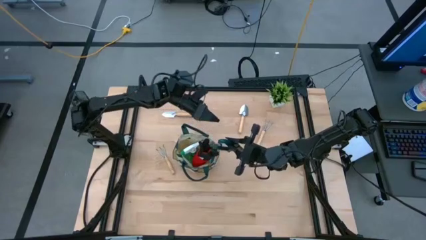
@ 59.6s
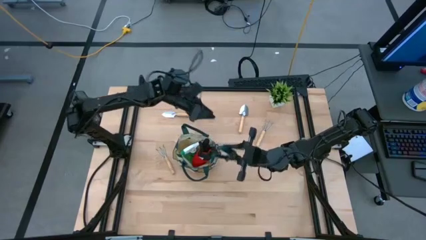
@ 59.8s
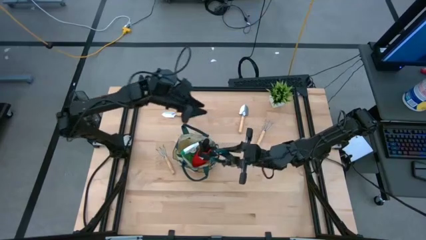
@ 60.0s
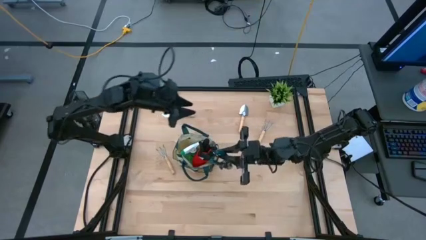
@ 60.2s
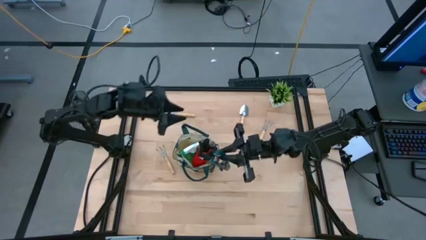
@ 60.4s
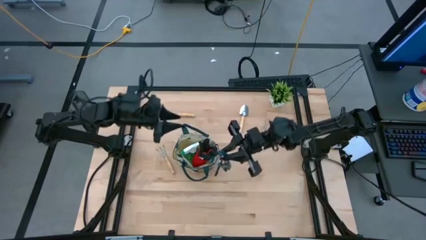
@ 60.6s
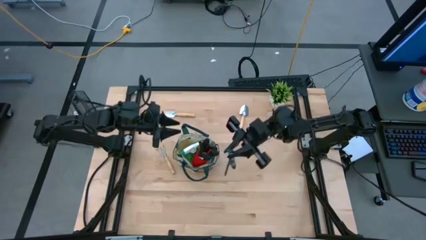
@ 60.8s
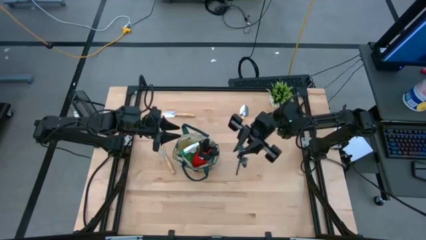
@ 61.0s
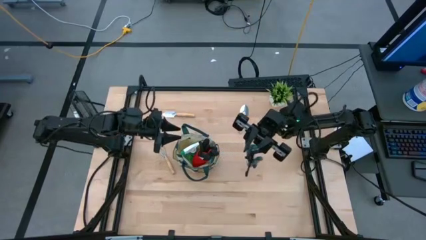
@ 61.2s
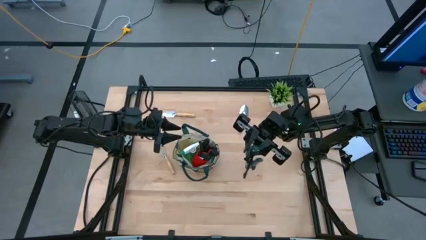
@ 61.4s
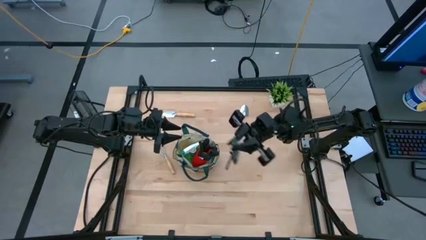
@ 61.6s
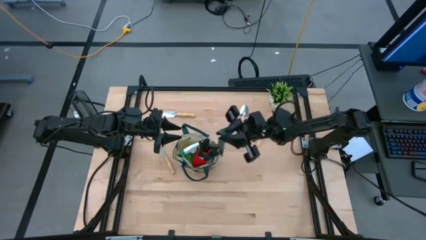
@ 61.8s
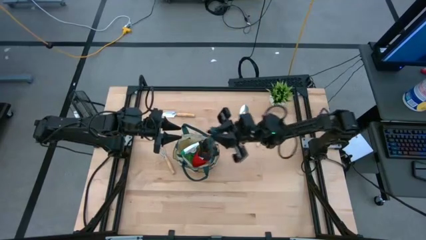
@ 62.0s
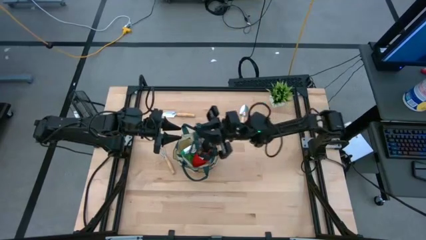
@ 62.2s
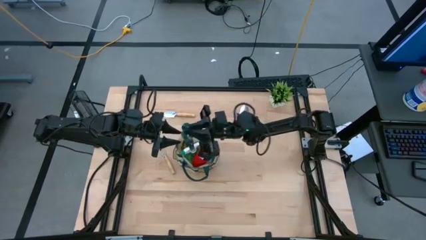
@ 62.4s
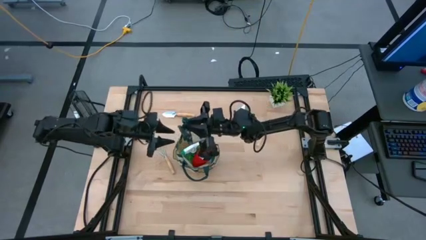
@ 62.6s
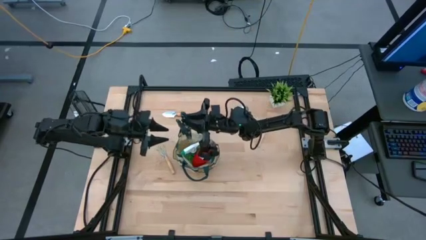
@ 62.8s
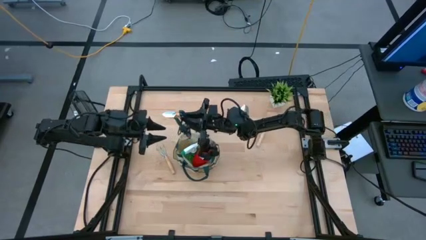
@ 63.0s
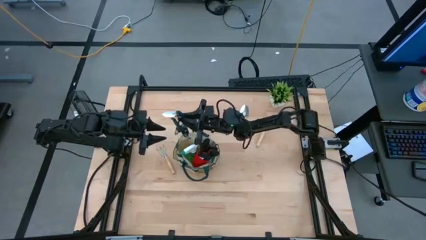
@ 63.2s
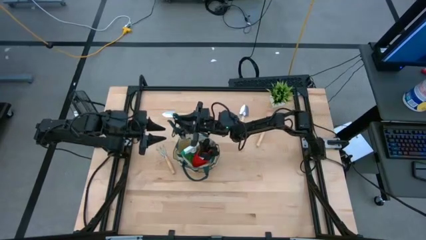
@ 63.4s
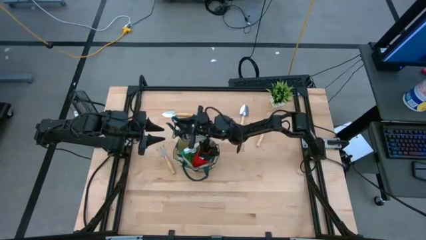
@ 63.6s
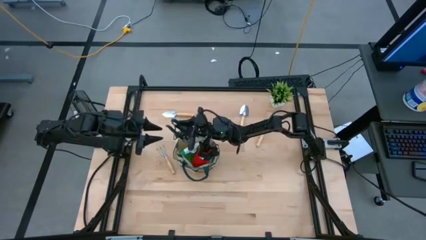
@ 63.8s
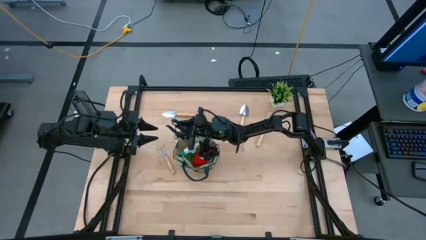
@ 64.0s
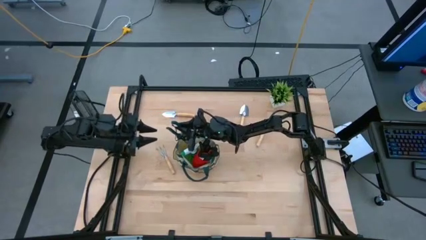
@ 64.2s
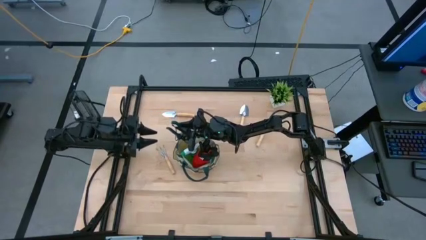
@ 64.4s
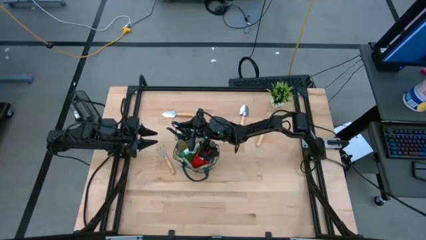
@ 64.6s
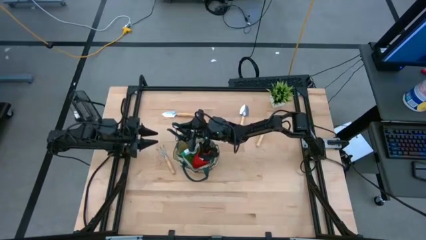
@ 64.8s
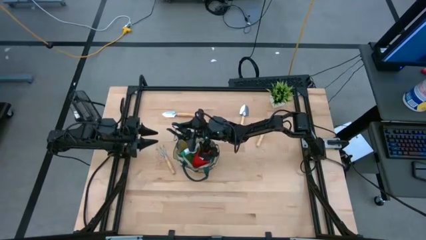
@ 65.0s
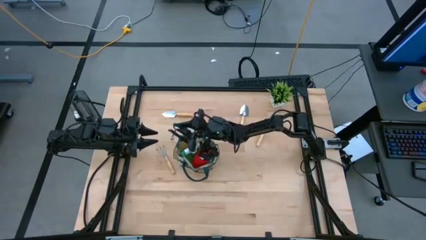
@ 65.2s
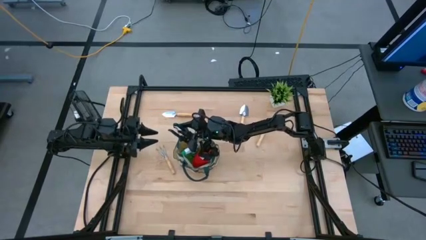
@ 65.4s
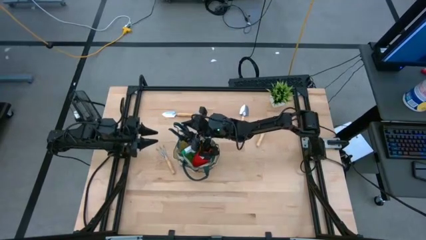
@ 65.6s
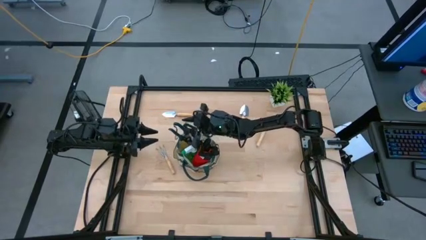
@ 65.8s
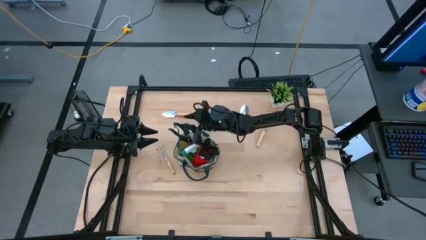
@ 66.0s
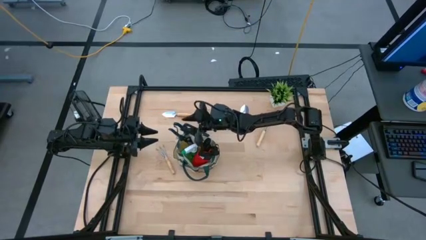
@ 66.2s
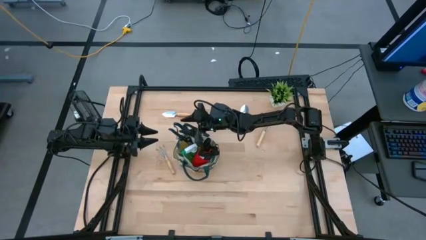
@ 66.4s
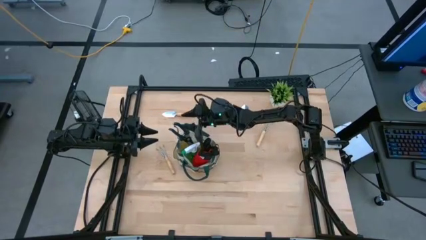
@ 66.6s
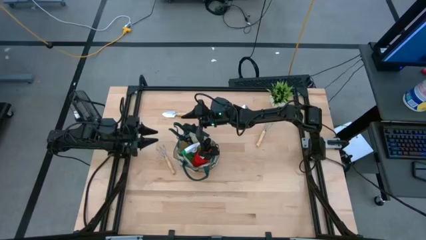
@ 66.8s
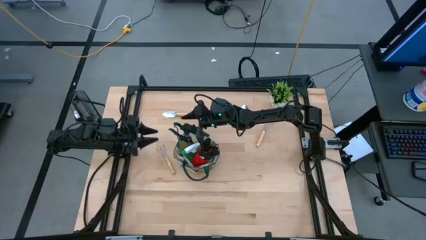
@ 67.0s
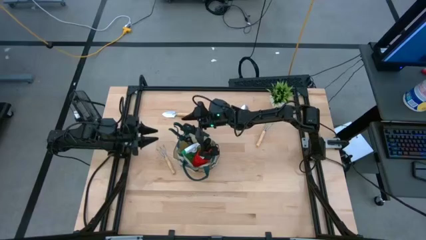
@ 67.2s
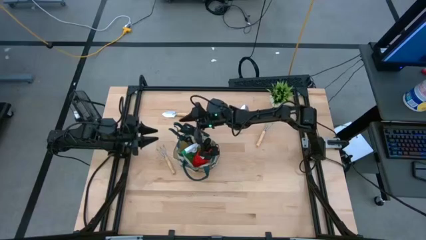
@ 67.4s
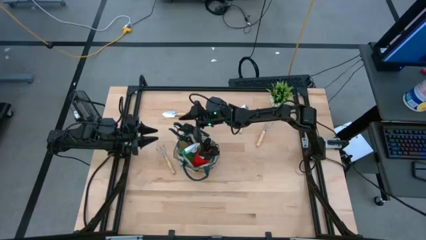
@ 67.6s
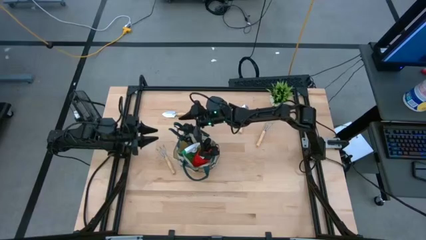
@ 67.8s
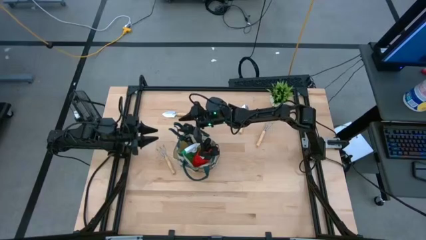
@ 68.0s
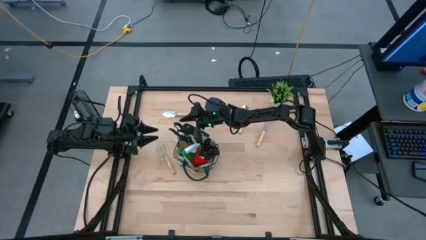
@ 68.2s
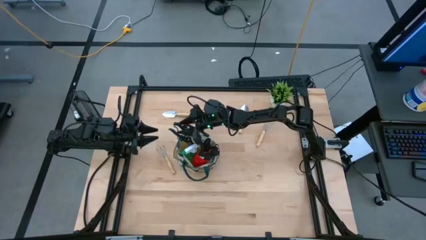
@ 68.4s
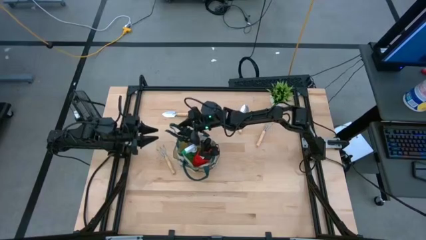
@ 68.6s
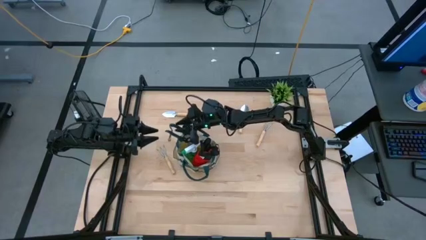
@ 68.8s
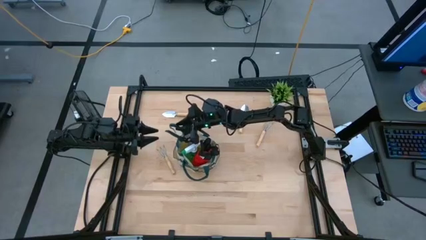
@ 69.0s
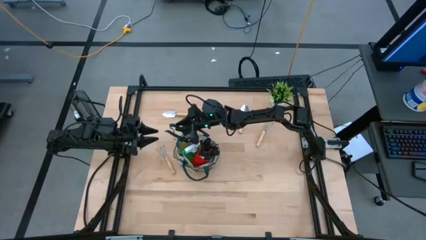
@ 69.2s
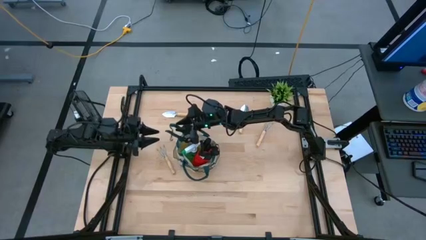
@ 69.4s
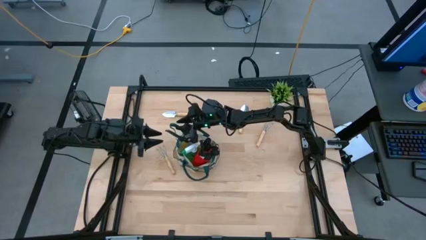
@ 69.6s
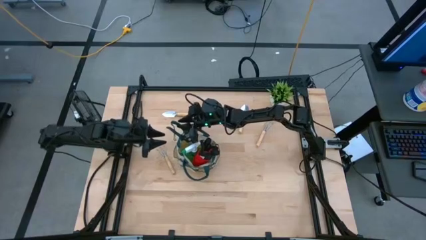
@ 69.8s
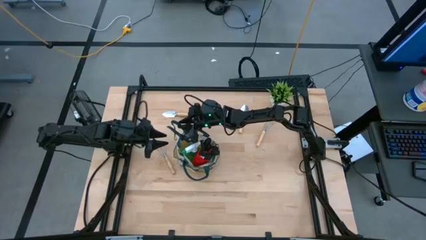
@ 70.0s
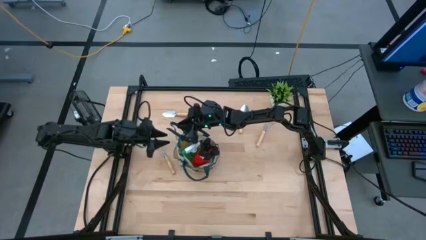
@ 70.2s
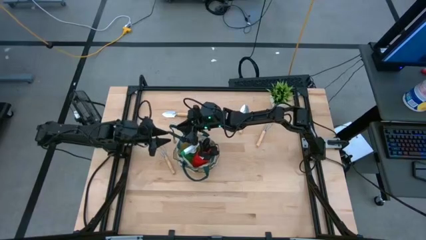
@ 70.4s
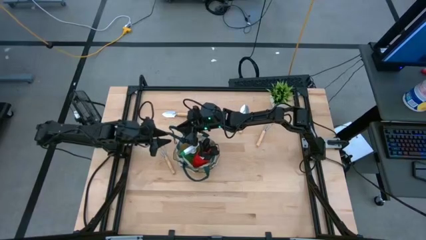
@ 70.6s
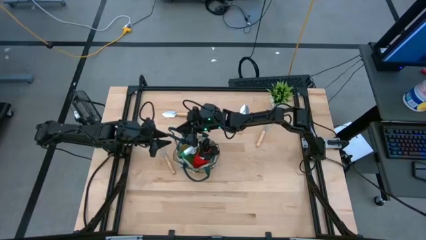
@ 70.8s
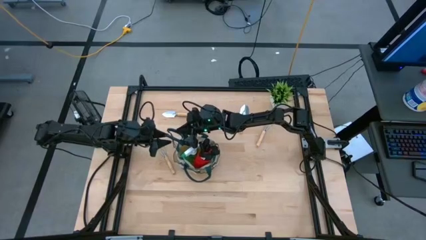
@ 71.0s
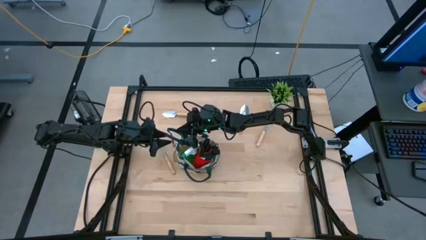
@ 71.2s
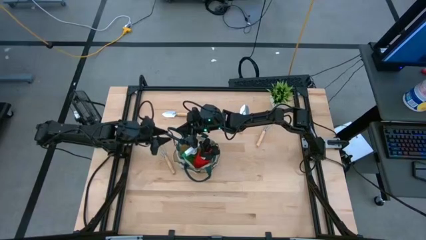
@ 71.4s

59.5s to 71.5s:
Task: Pick & Place Garden tools in Gardening bag
Put the green shear scissors into the brown gardening bag
